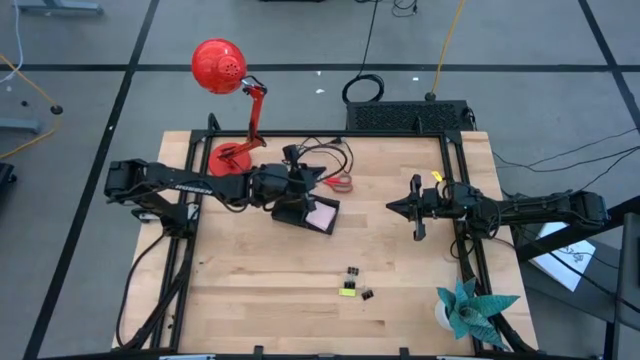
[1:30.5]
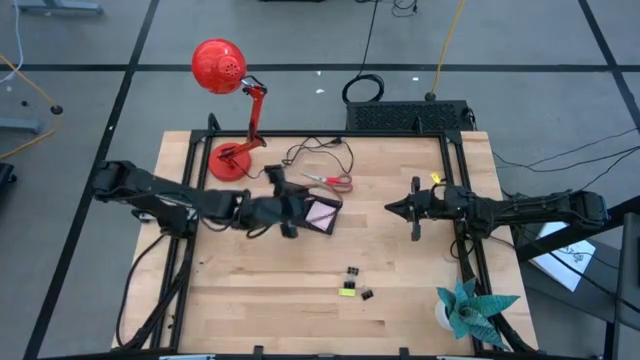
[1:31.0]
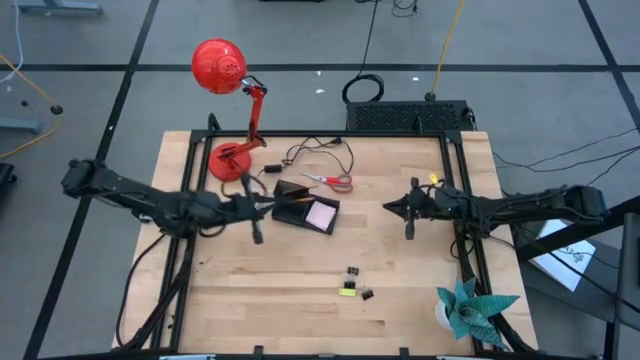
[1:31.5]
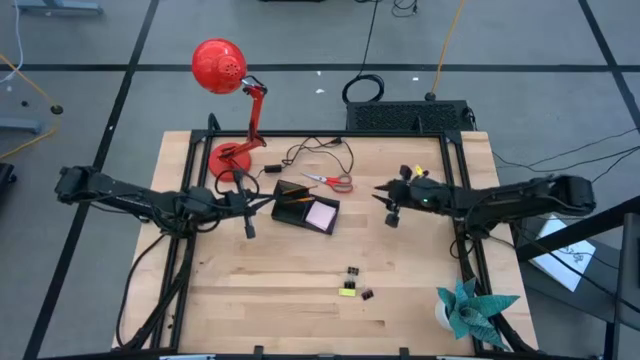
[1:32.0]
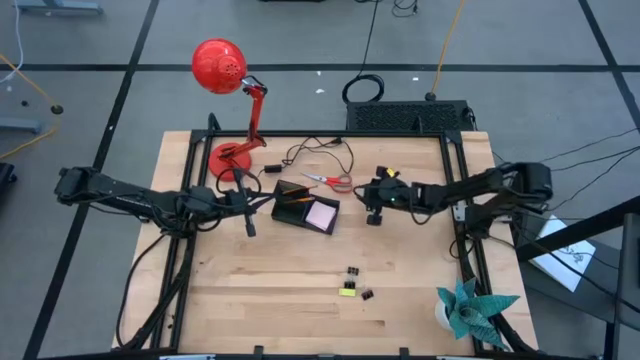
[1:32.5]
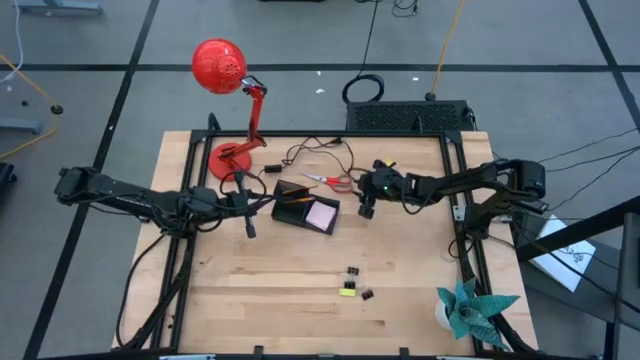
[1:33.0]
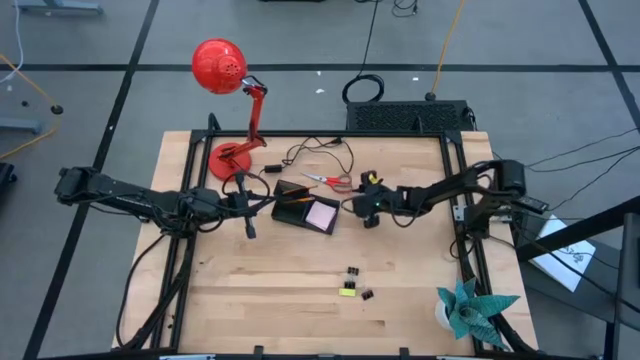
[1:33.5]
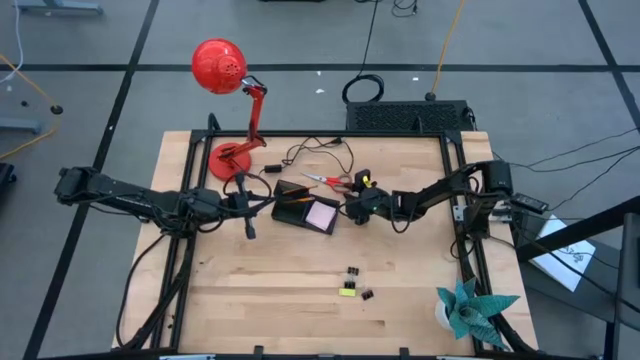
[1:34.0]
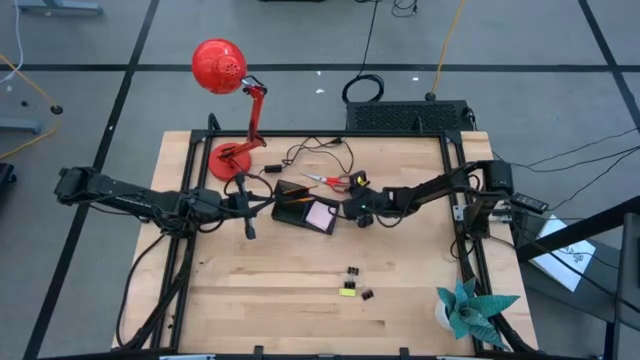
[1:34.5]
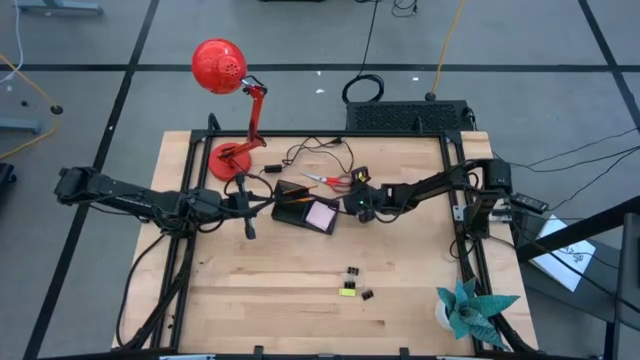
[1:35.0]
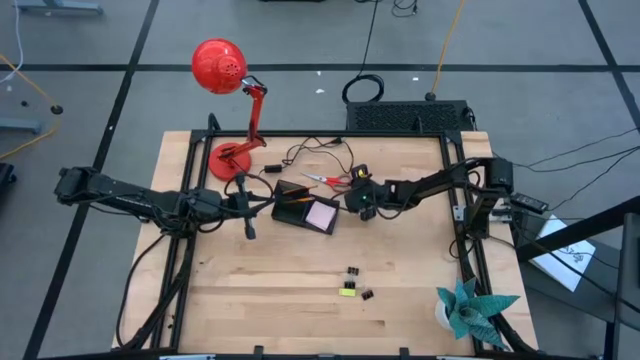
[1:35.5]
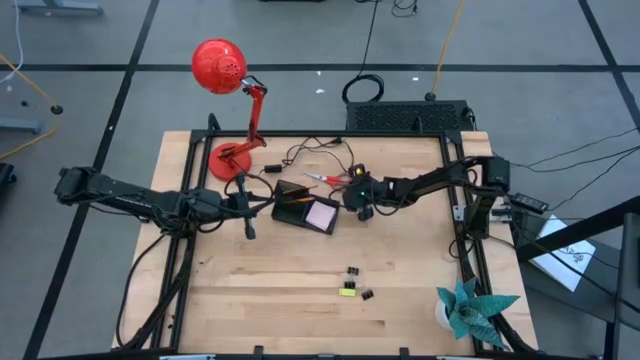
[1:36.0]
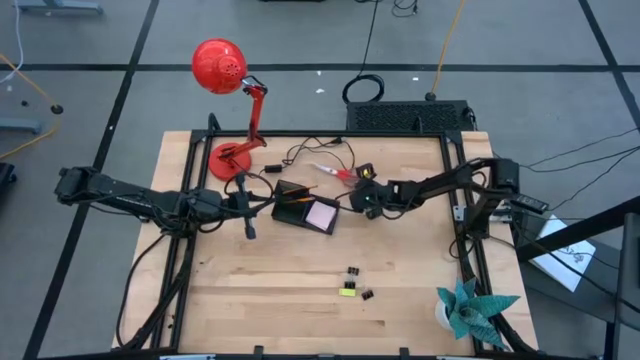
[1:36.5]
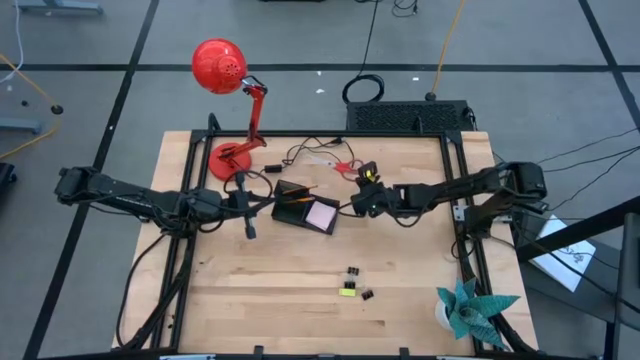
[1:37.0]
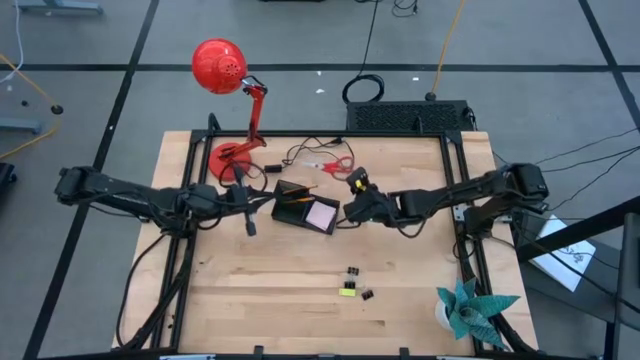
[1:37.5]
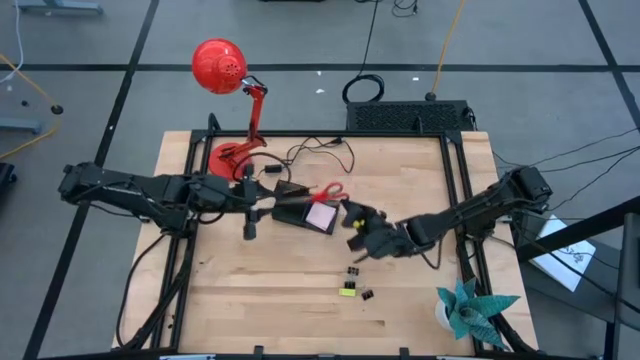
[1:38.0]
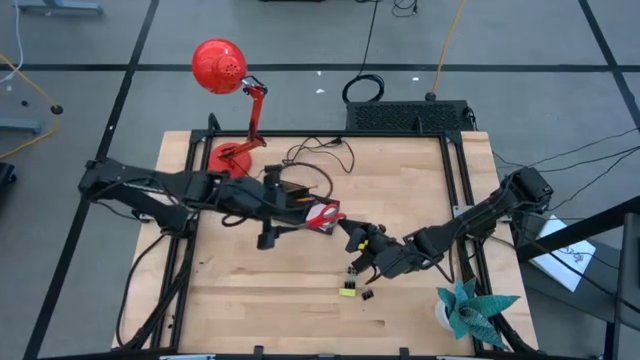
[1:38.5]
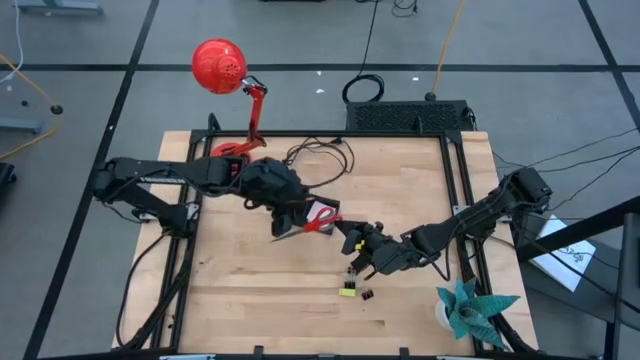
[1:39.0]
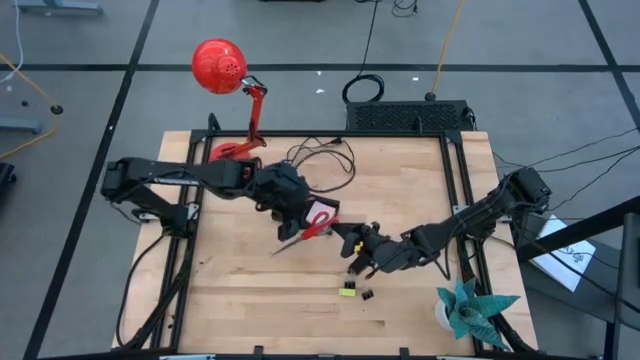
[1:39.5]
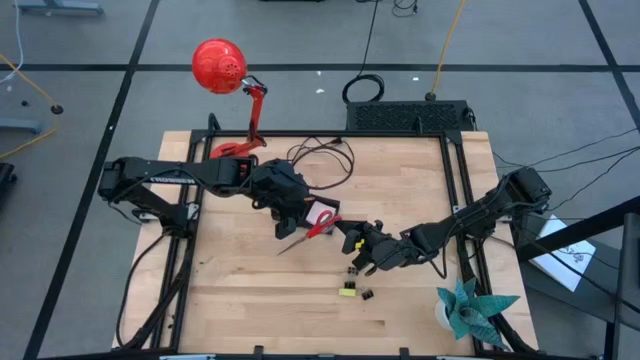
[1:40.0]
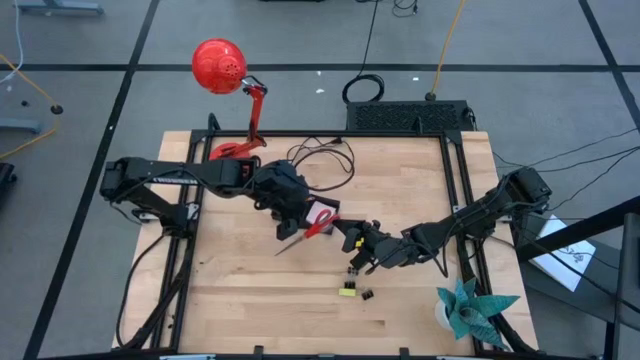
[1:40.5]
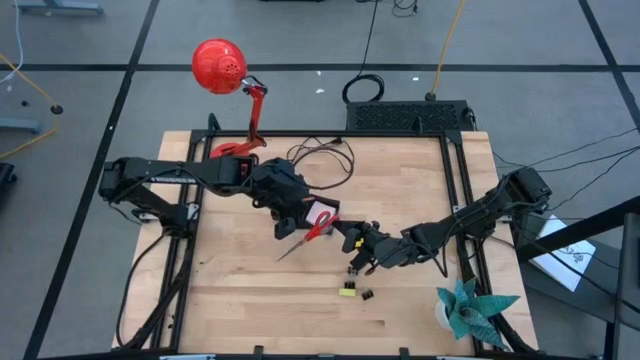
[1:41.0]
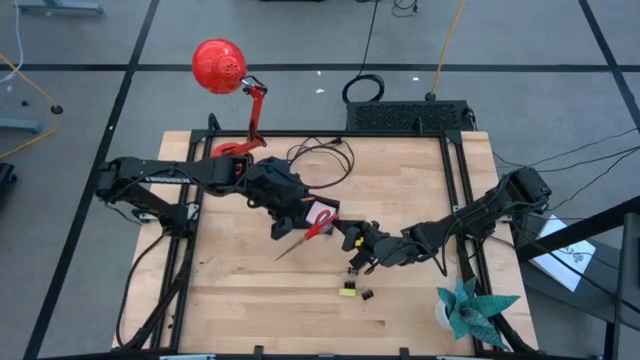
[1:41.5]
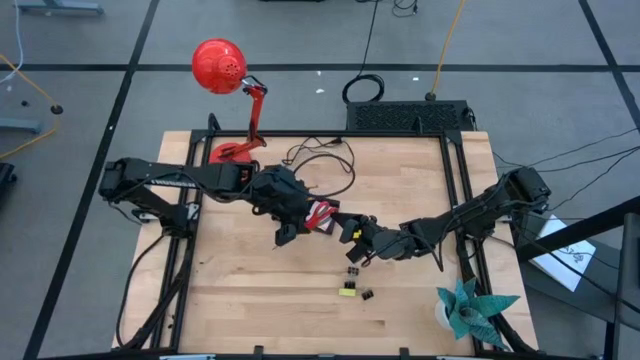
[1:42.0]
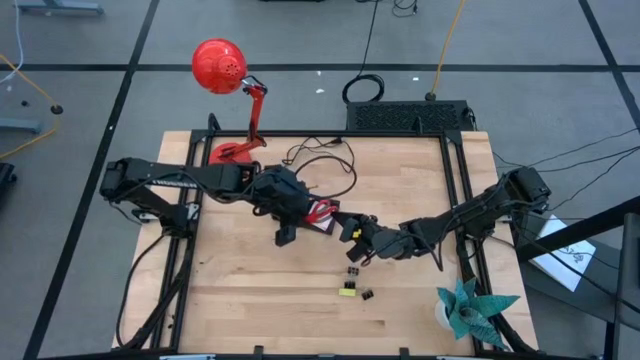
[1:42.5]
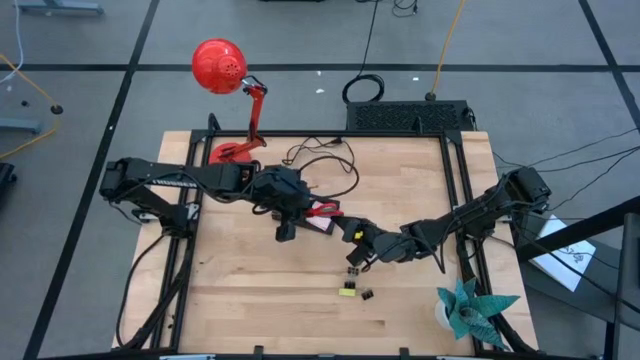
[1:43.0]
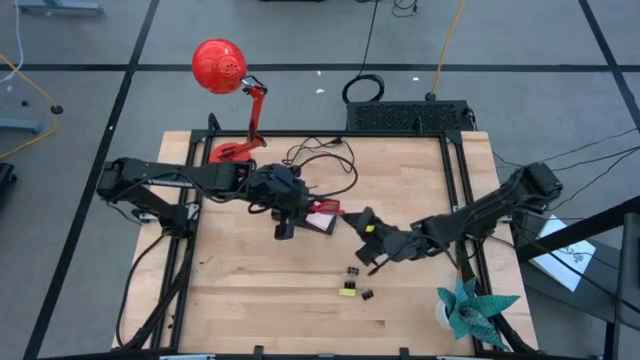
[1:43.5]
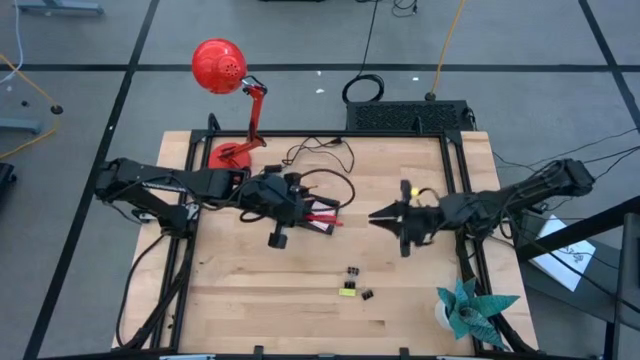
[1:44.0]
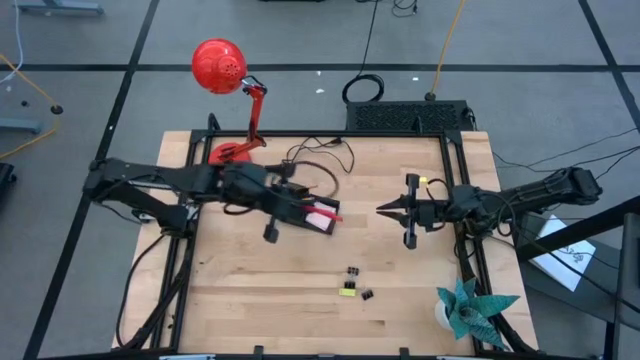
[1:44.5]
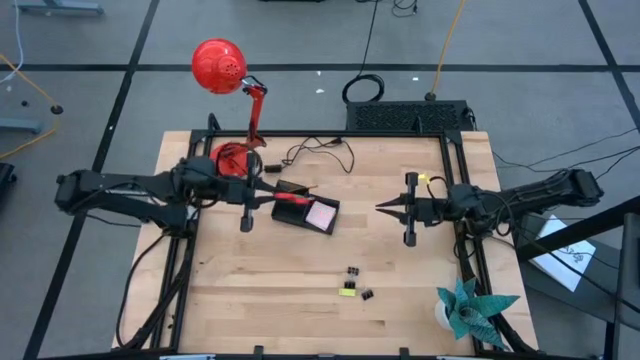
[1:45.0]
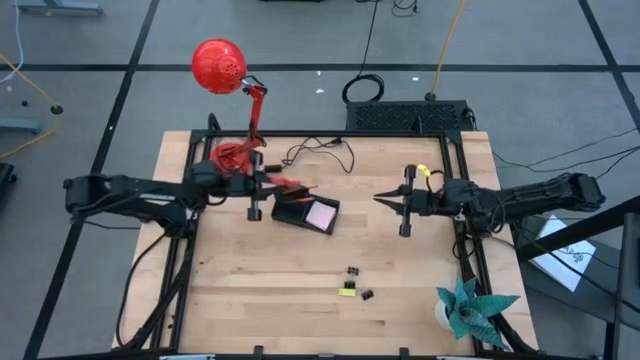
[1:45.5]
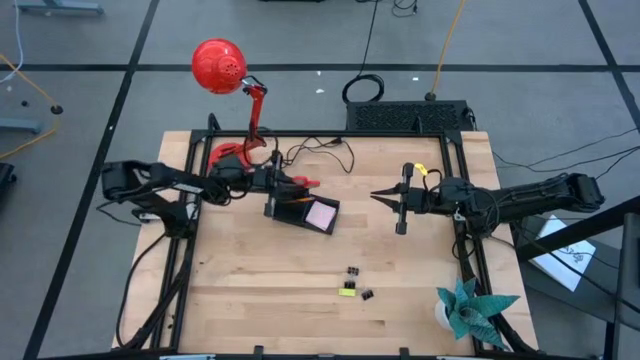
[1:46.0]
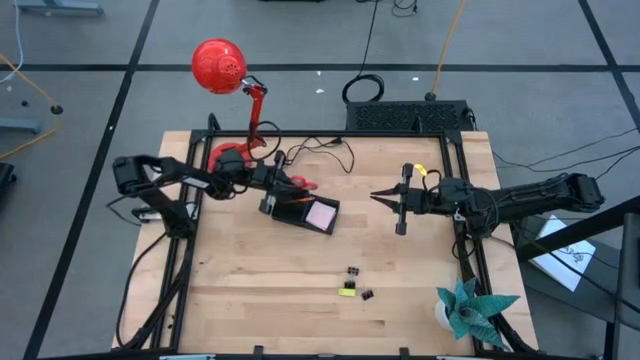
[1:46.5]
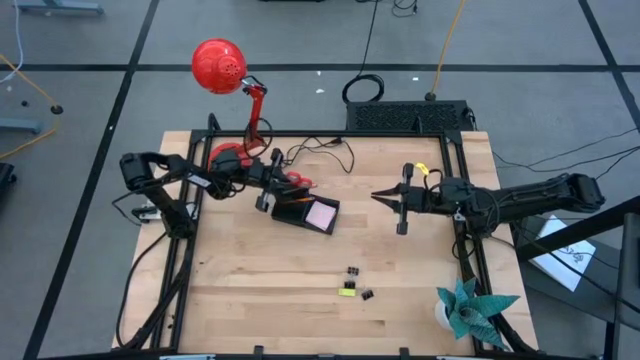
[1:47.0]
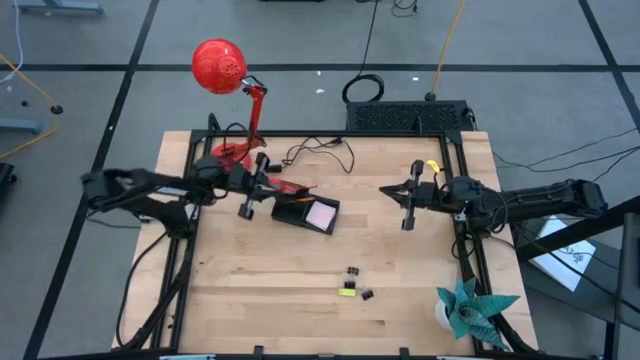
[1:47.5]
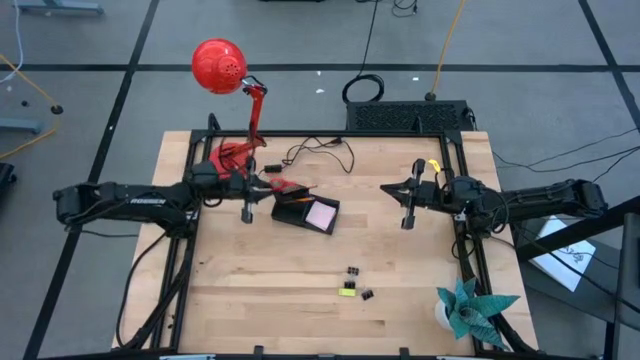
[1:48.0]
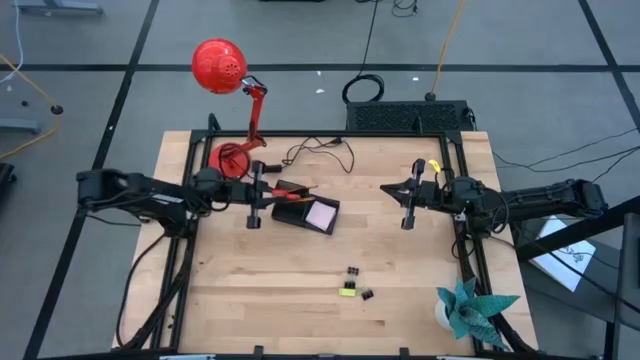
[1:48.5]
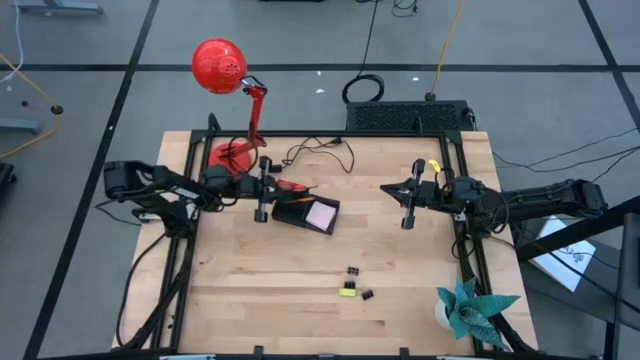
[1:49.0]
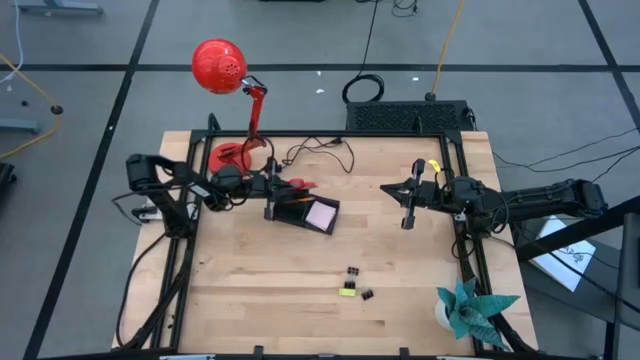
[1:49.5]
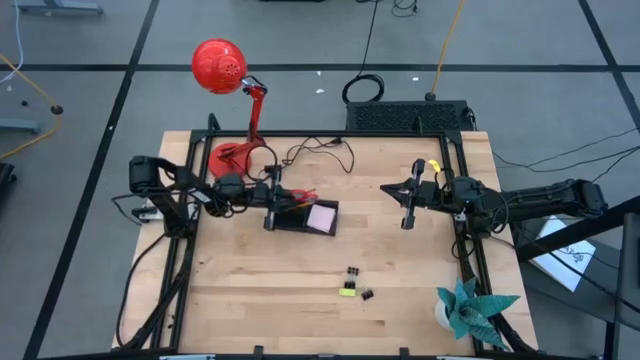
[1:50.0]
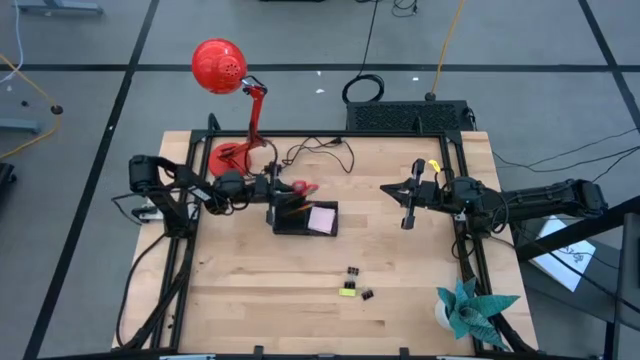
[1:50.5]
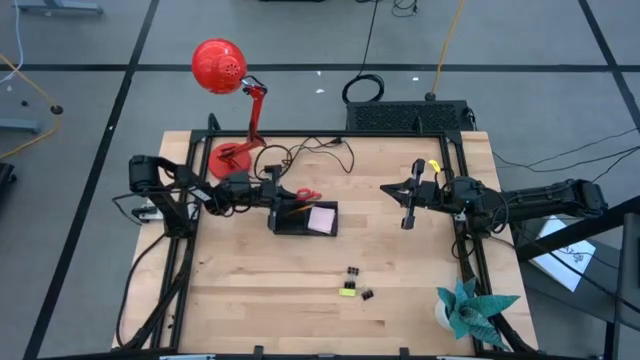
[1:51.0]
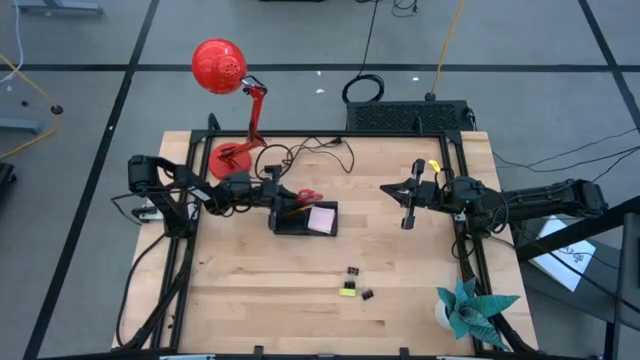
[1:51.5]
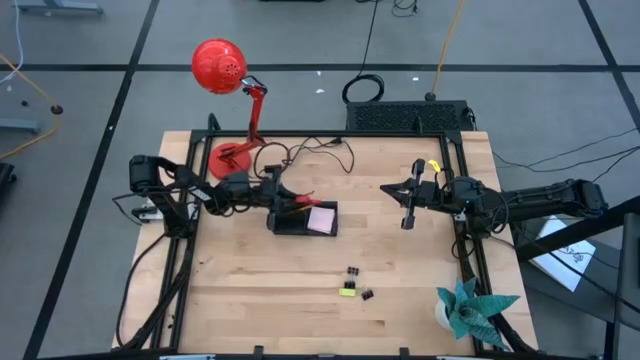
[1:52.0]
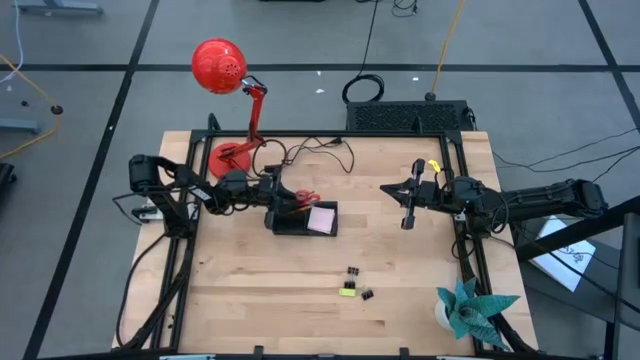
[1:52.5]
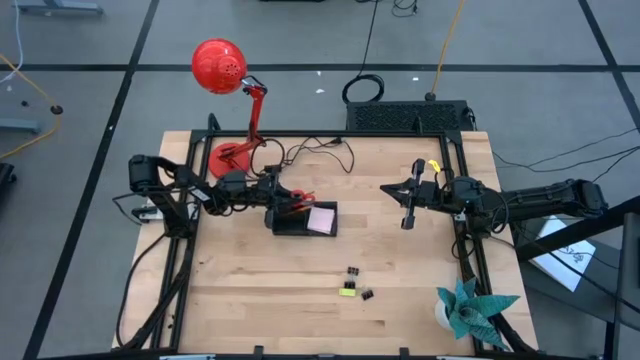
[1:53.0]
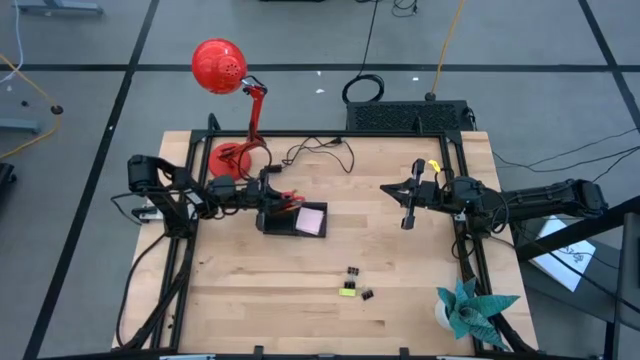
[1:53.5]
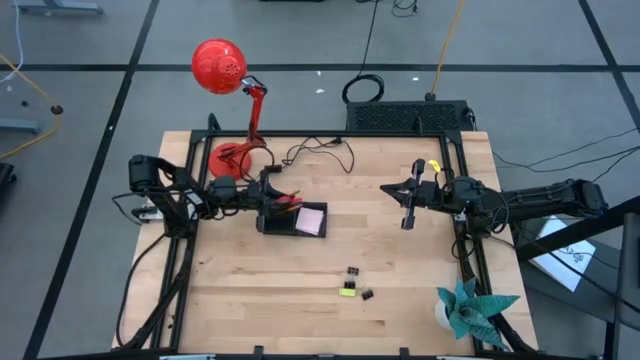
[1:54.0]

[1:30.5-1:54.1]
Task: Pick and place office supplies into organizer
Put the orange scissors into the desk organizer
